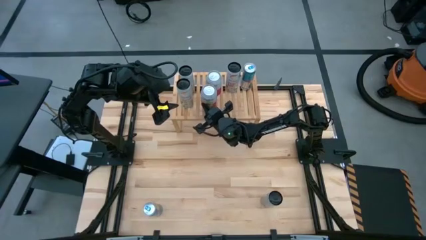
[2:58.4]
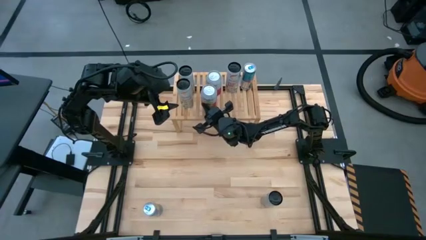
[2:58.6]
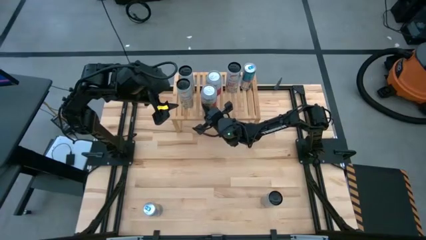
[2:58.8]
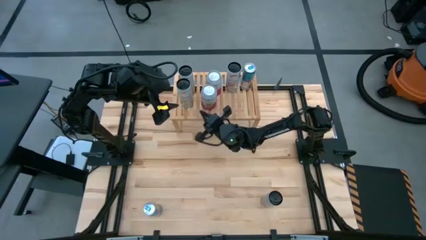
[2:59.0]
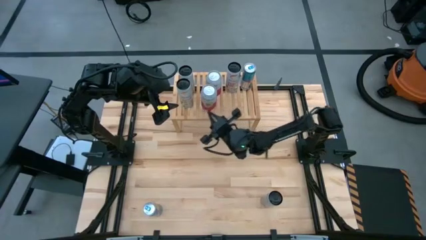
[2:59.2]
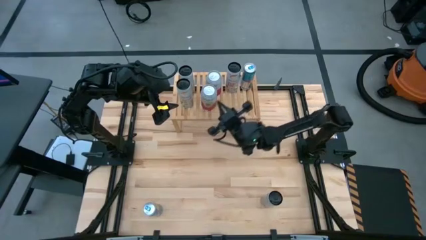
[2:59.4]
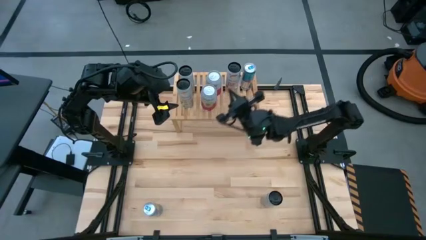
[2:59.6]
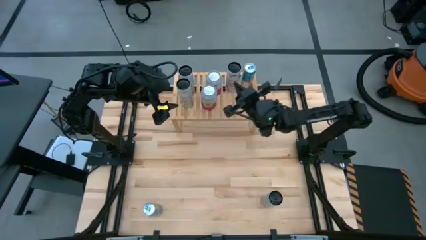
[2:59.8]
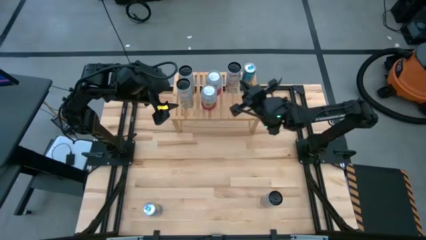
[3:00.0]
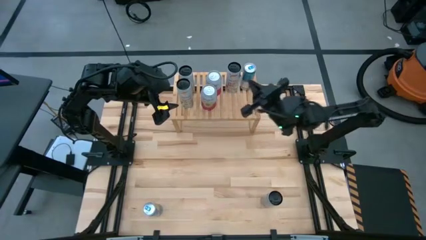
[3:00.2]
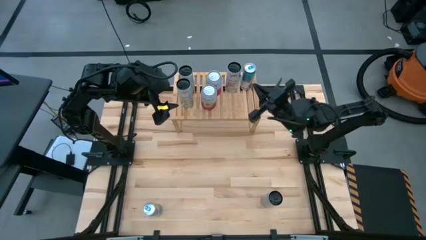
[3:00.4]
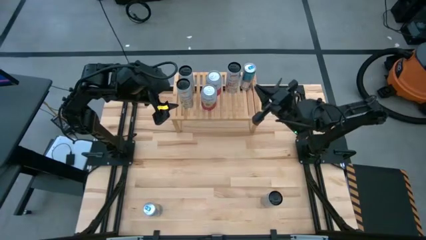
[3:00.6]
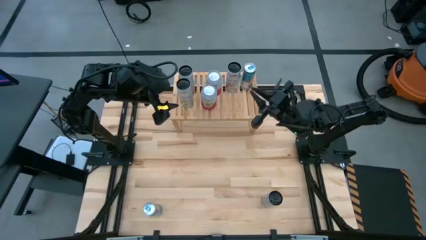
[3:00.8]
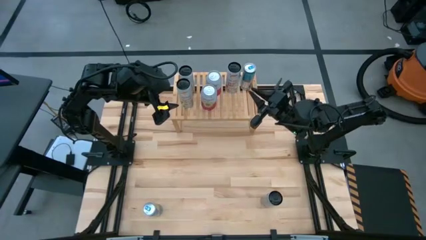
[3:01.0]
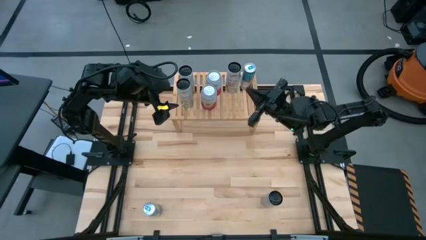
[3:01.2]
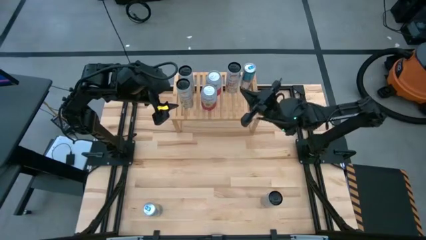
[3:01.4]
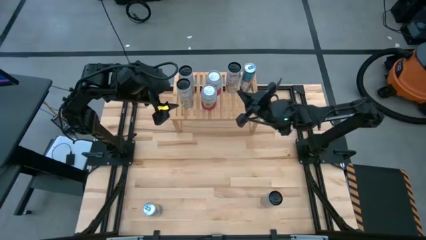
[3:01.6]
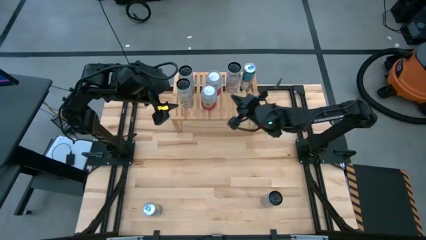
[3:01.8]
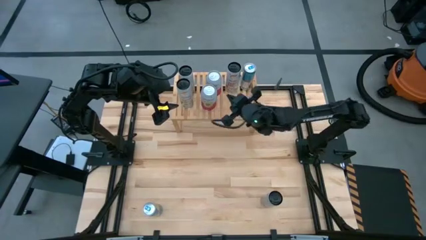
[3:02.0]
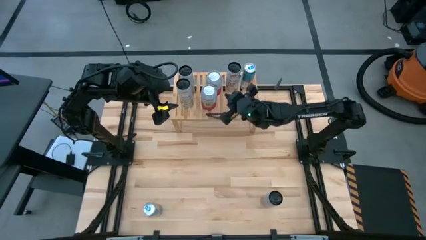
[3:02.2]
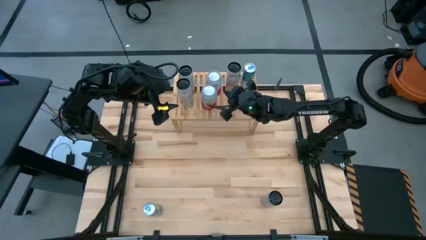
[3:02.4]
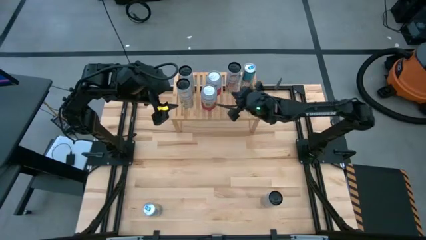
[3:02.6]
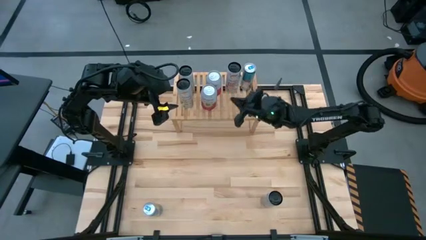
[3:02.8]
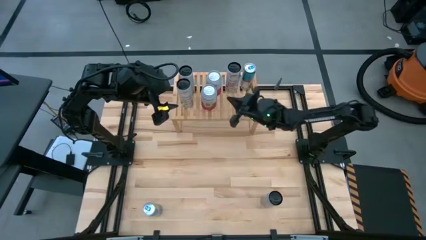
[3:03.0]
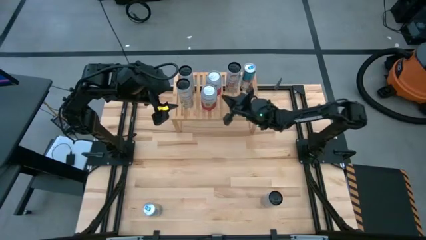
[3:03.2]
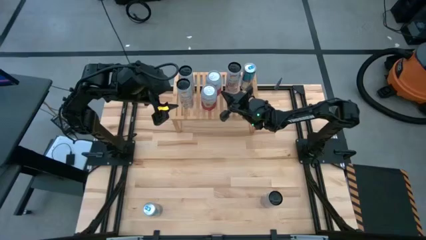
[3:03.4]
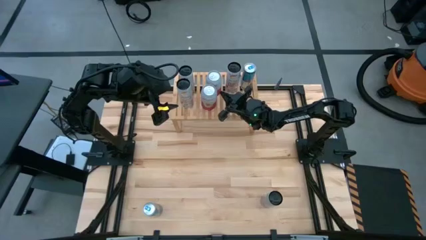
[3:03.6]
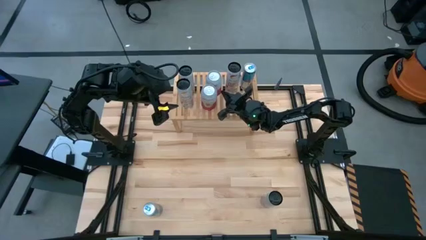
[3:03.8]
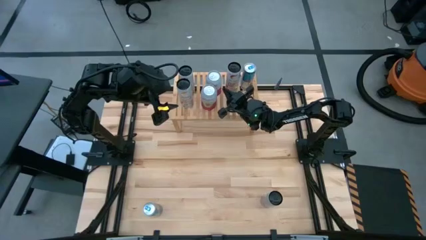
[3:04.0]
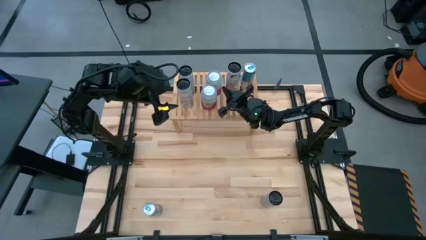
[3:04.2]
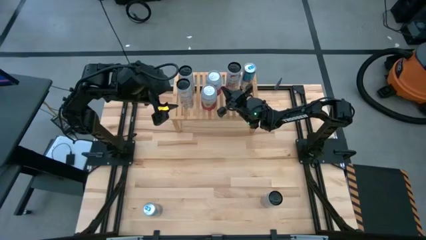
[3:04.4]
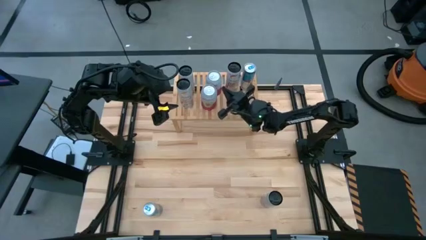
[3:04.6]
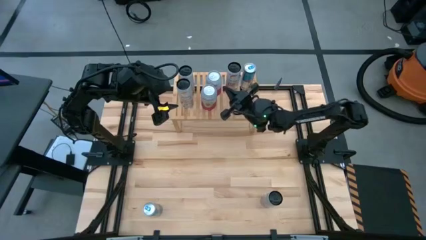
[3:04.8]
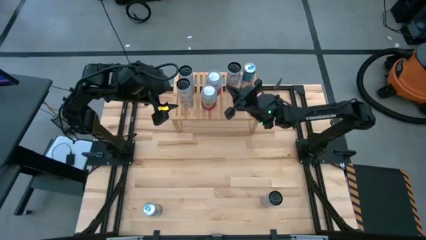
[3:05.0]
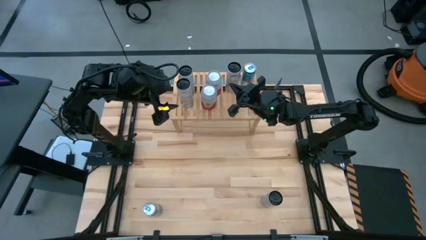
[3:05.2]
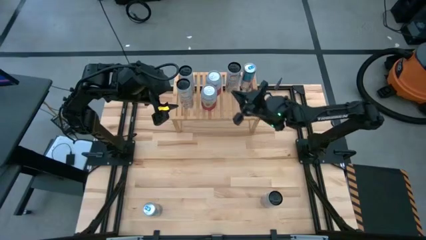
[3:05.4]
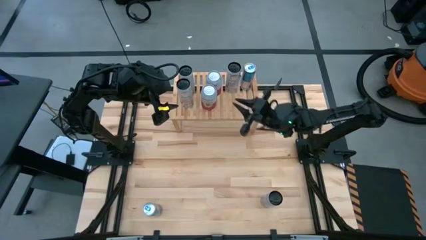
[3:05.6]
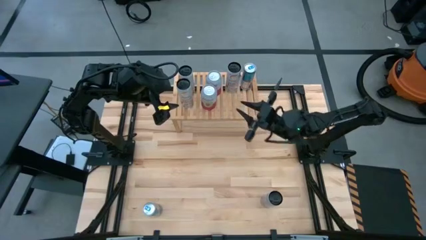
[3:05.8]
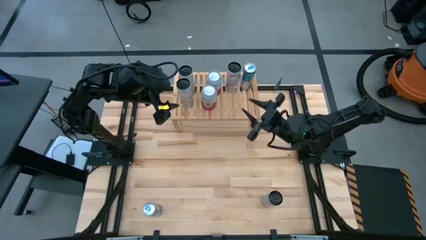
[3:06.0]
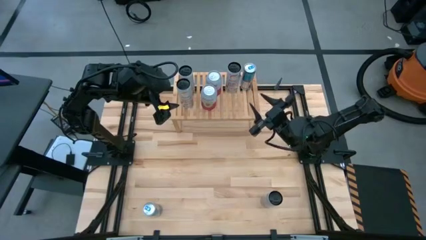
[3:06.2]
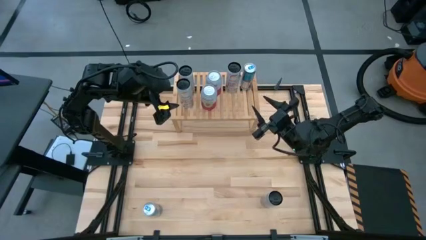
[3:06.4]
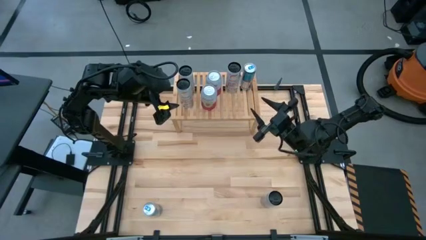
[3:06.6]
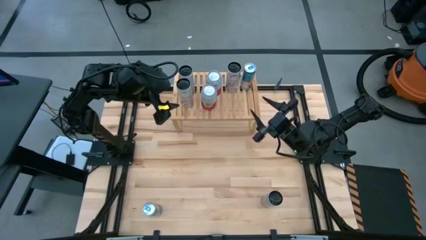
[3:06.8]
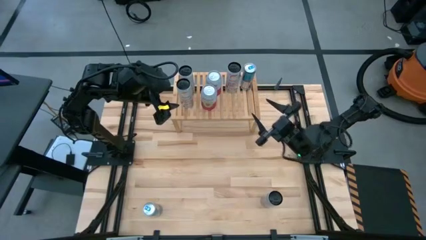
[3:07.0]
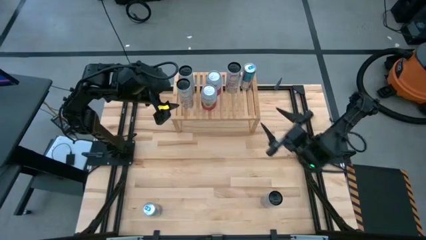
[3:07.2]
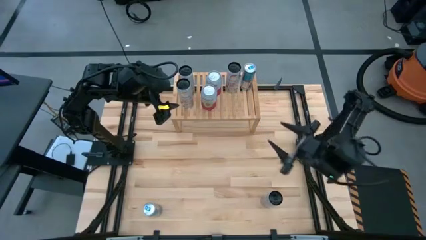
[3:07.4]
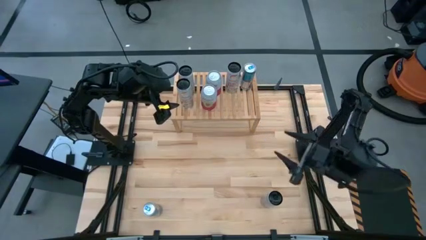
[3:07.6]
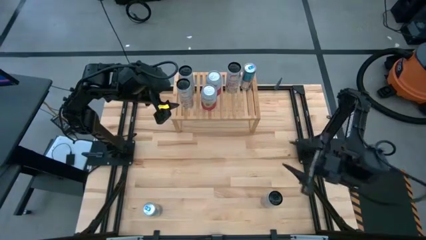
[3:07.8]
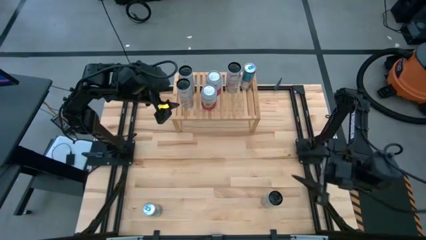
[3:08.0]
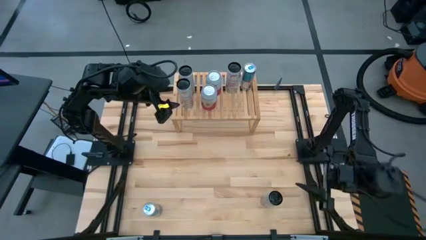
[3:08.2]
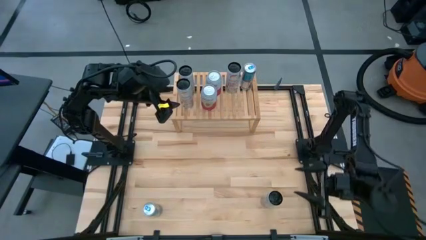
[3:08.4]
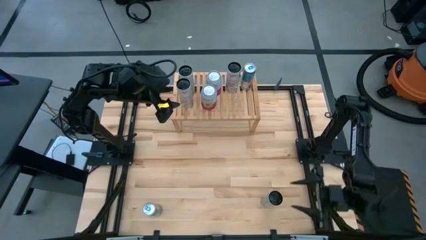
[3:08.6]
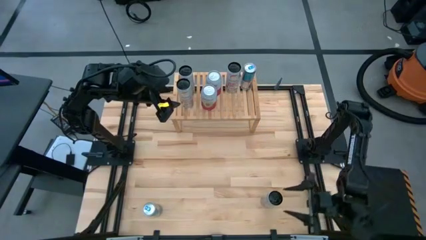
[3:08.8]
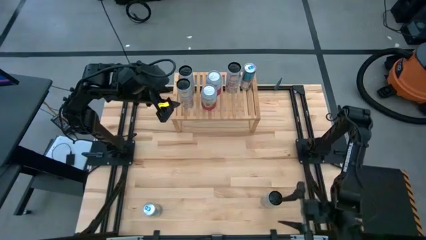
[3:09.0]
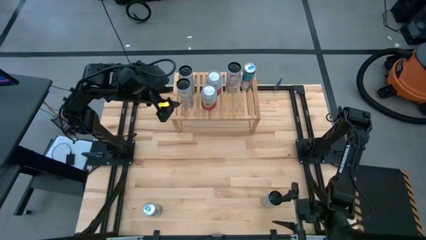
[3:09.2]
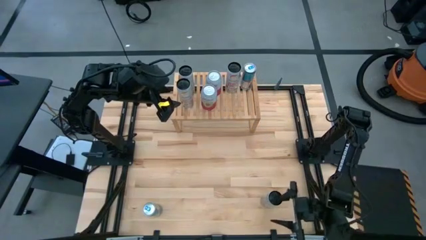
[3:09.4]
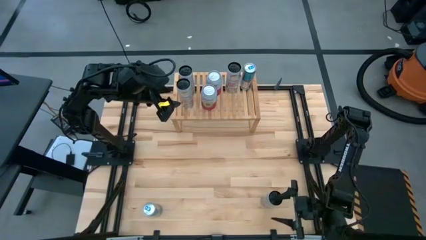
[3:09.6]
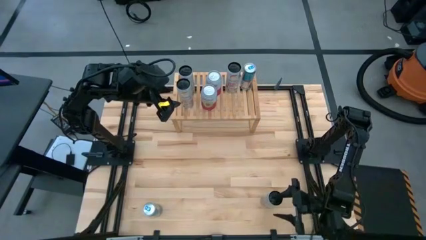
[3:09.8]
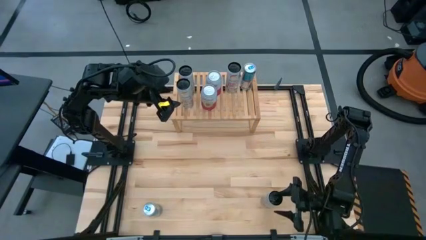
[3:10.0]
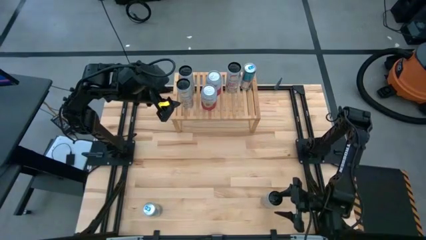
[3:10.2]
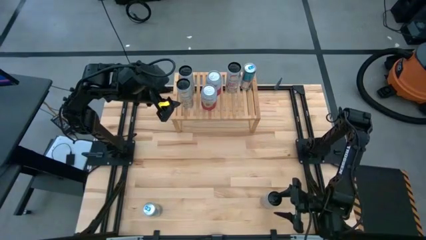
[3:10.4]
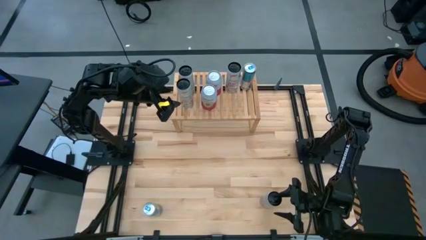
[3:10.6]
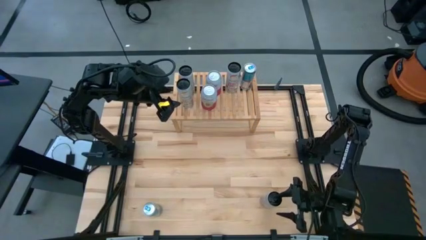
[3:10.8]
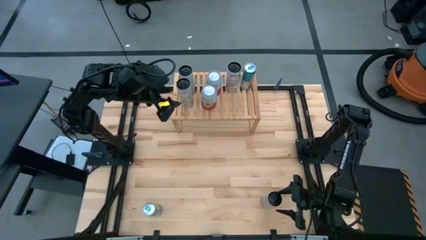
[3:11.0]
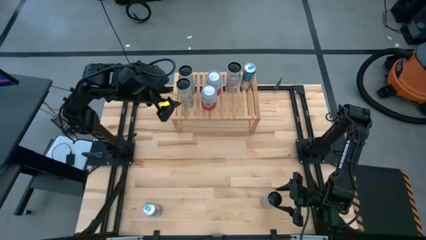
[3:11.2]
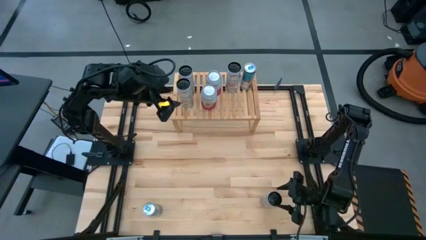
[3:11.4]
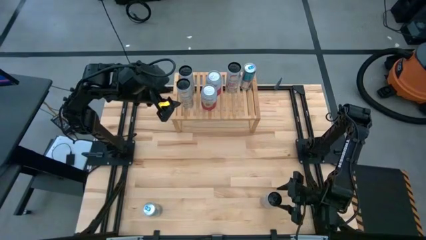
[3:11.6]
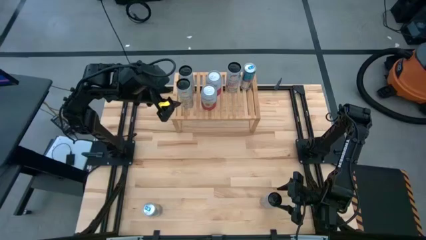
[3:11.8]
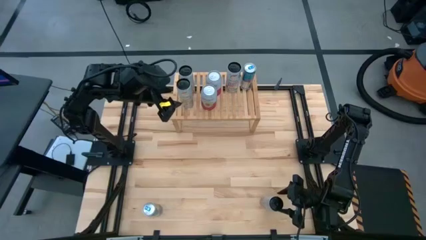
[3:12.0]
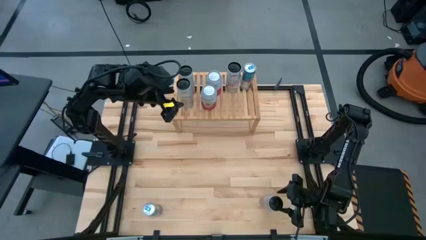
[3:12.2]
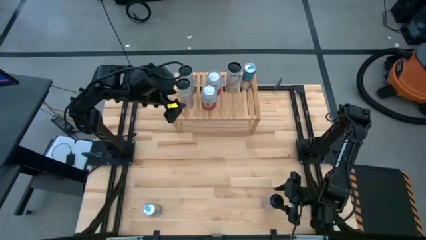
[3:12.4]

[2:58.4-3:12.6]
Task: Place canned beverage on shelf
Put the white pink soda can on the shelf aligned with the other white pink soda can
